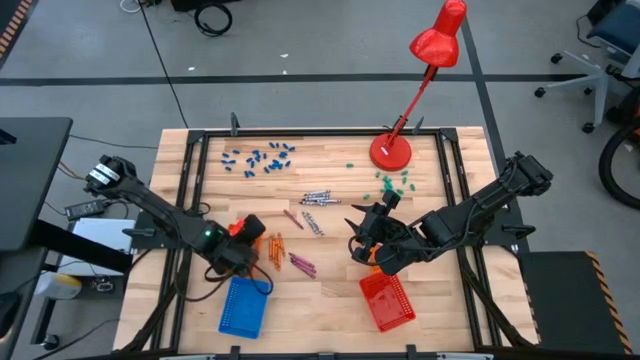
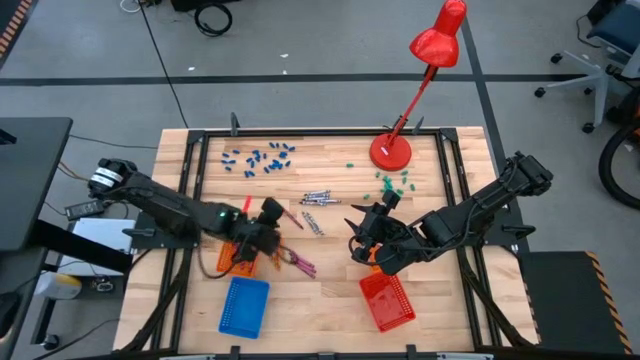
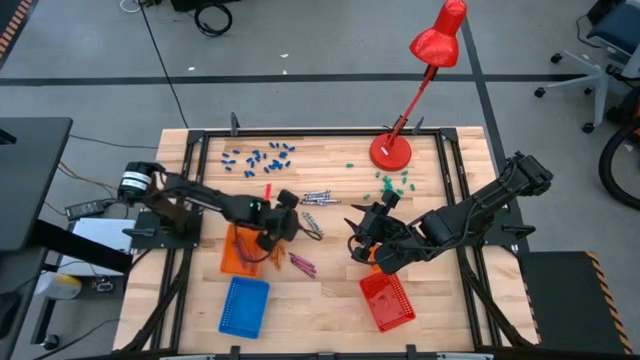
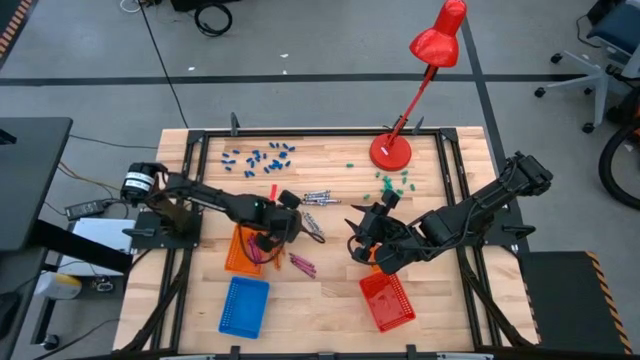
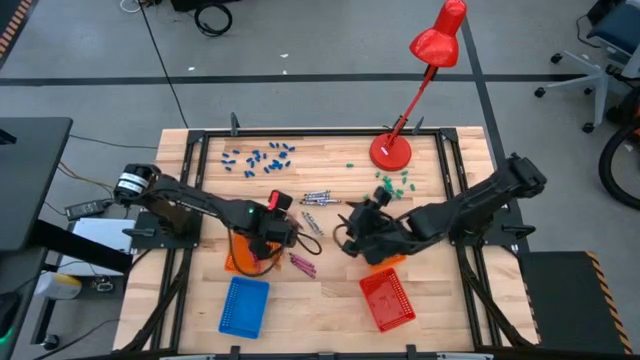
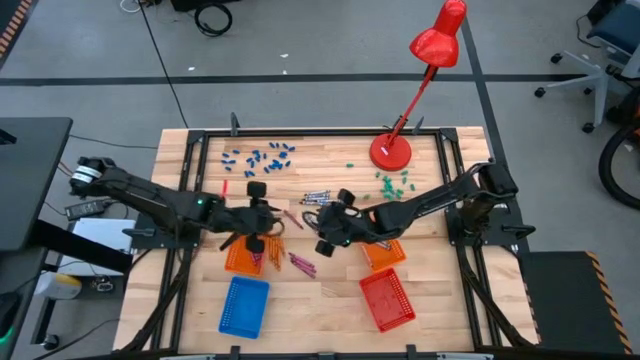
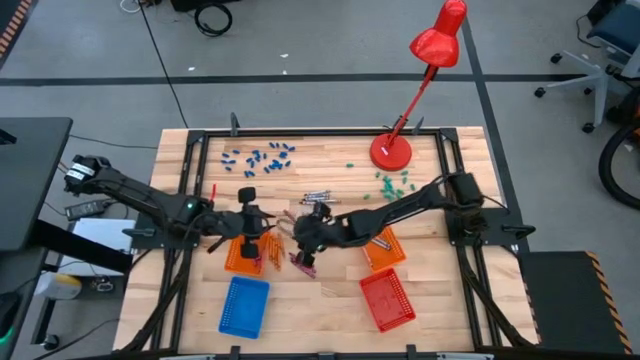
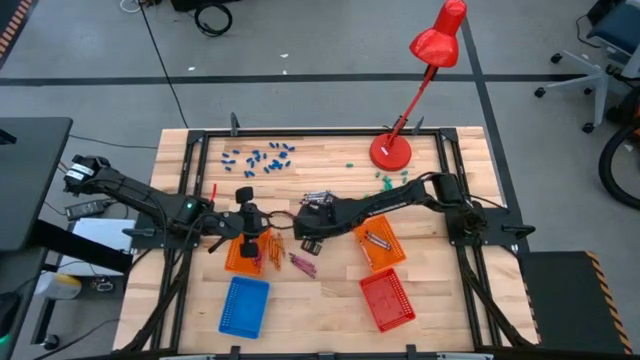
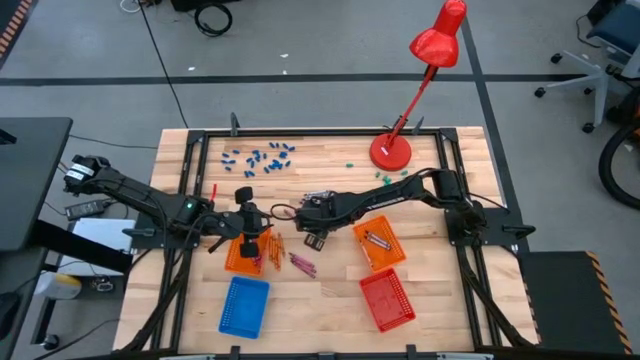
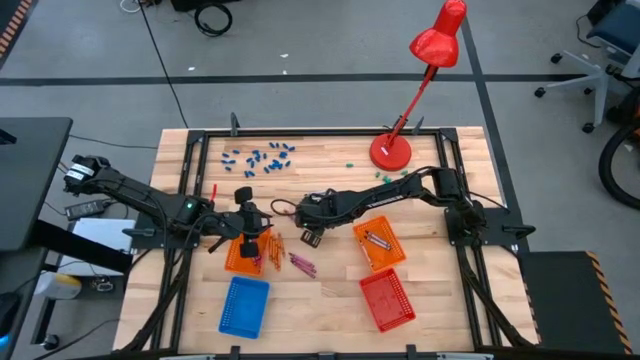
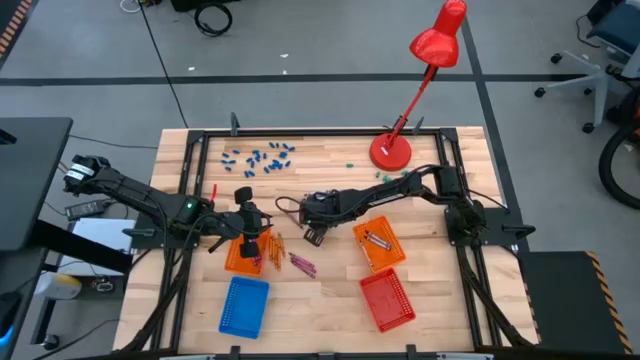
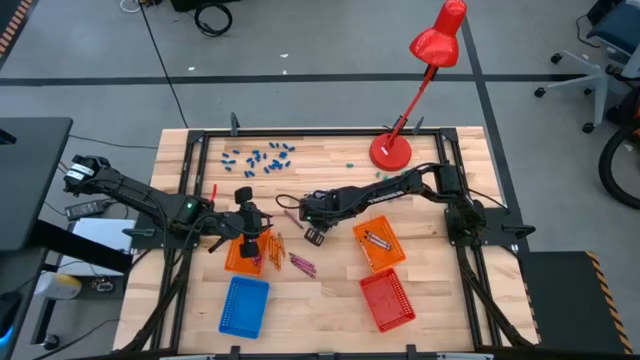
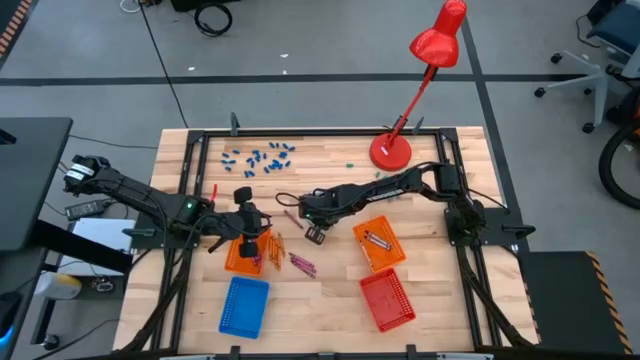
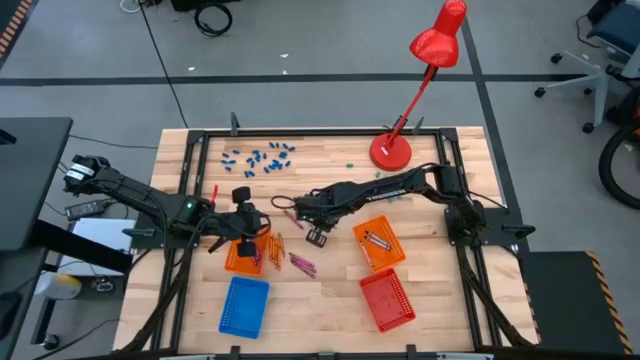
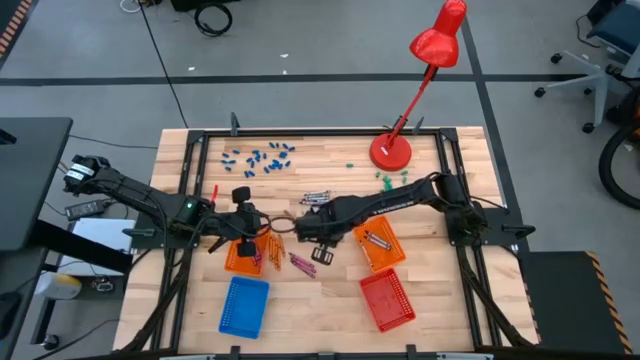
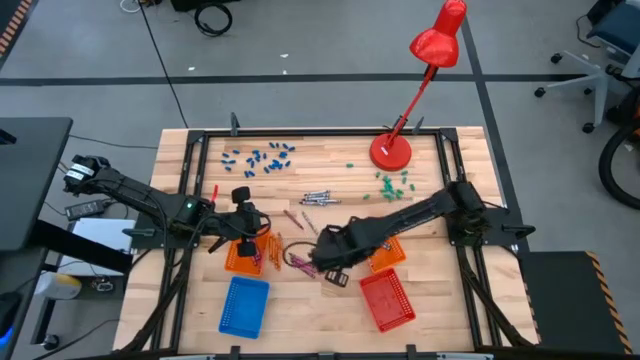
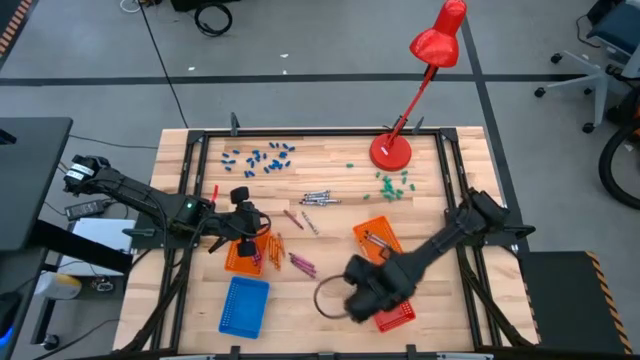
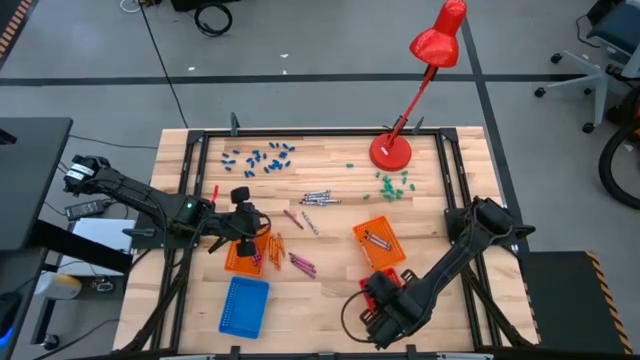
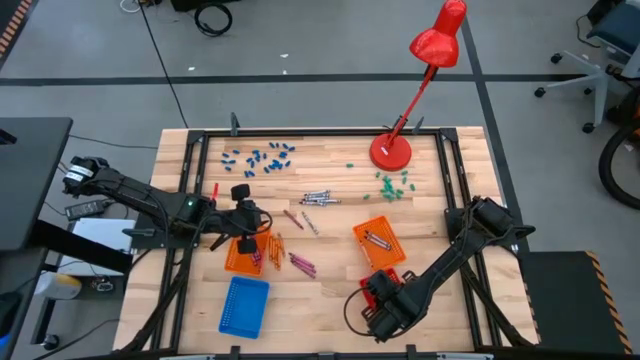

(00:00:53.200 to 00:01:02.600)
Task: Sort crayons
Put the gray crayon into the red bin

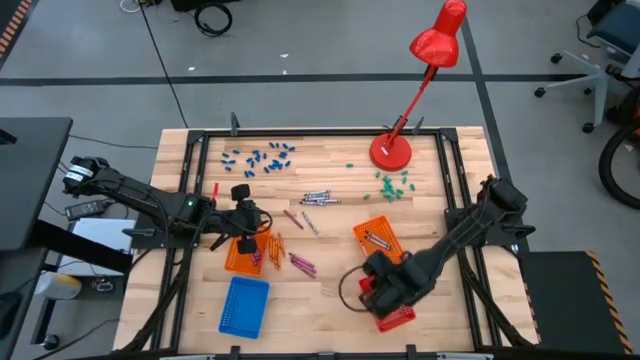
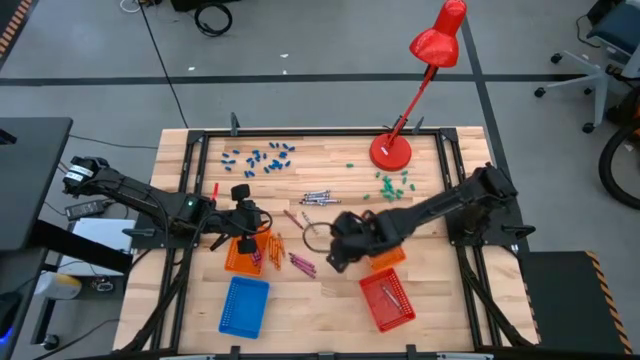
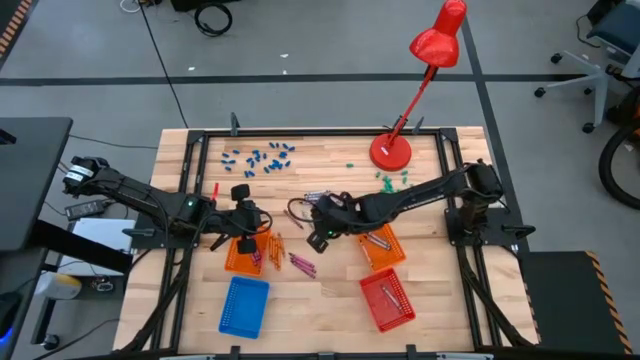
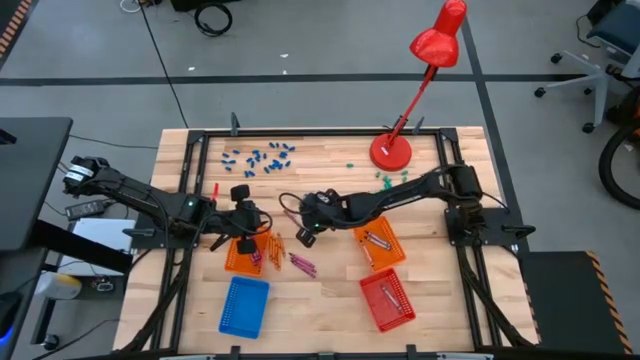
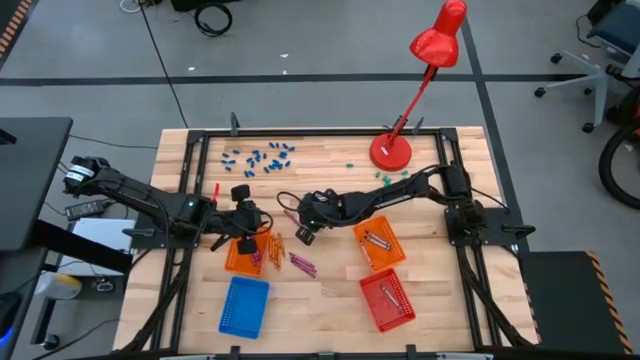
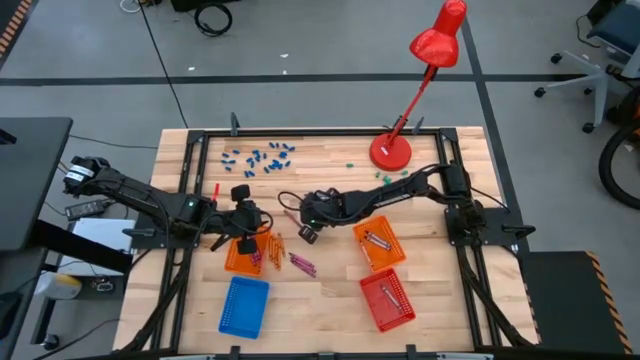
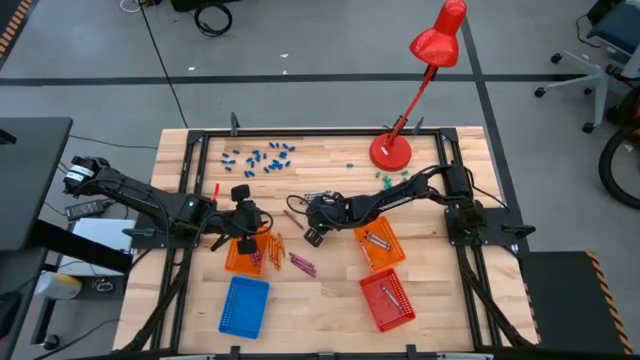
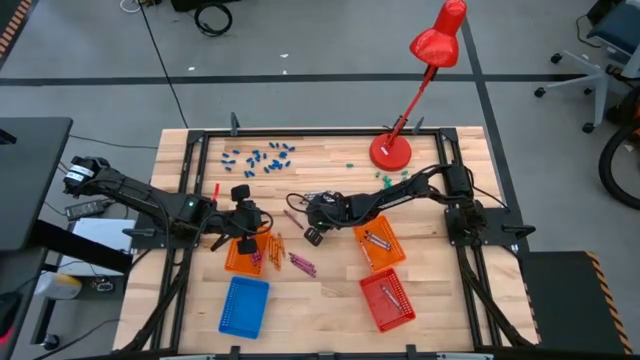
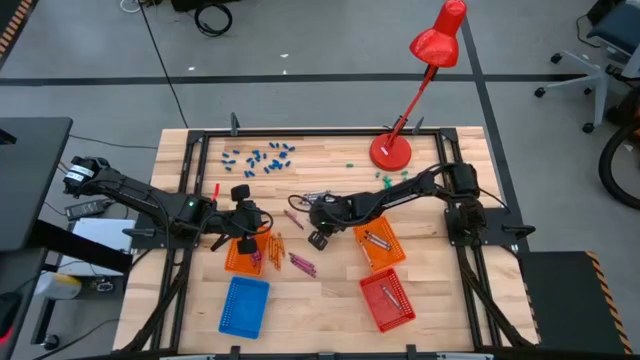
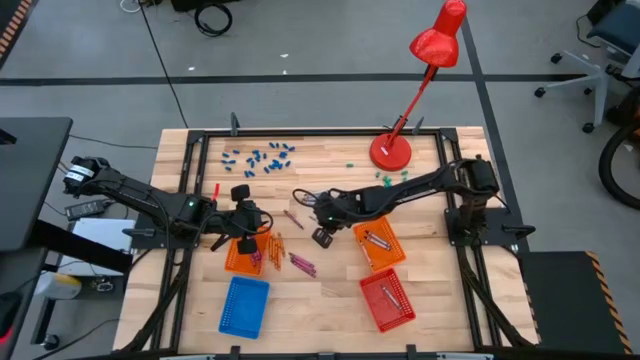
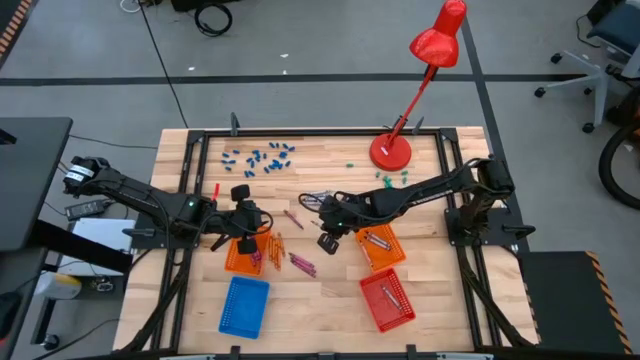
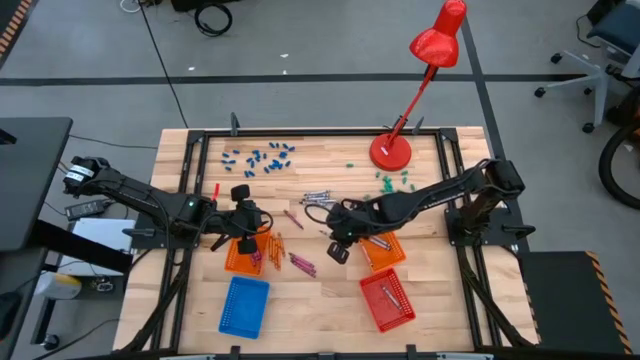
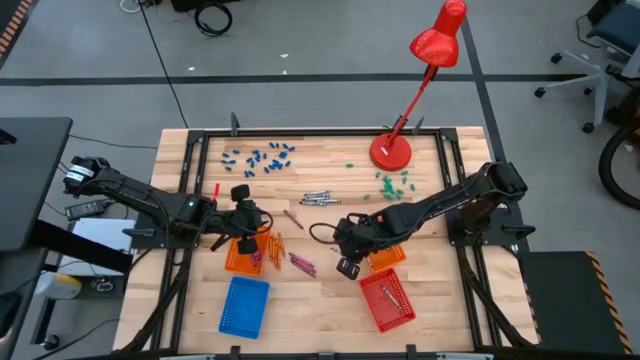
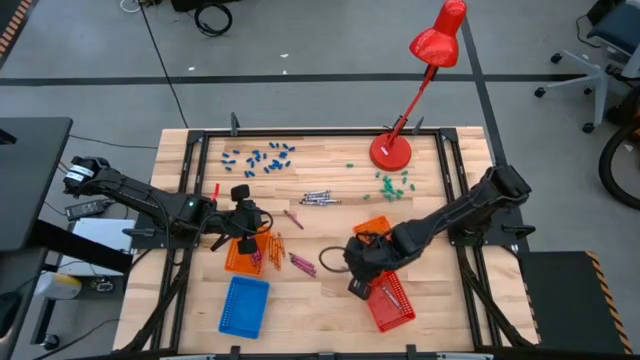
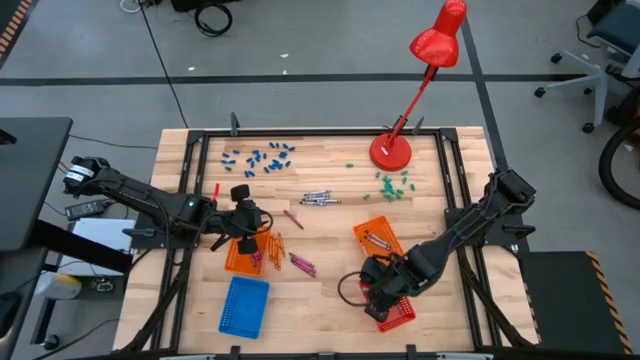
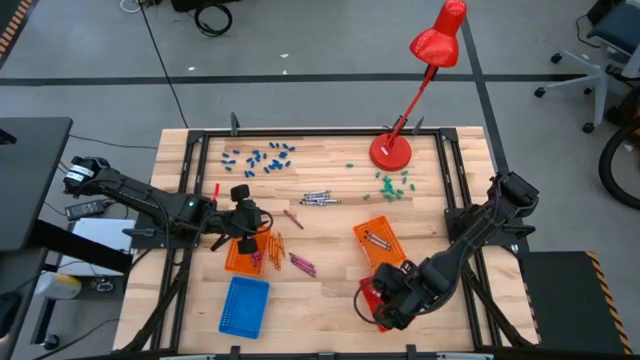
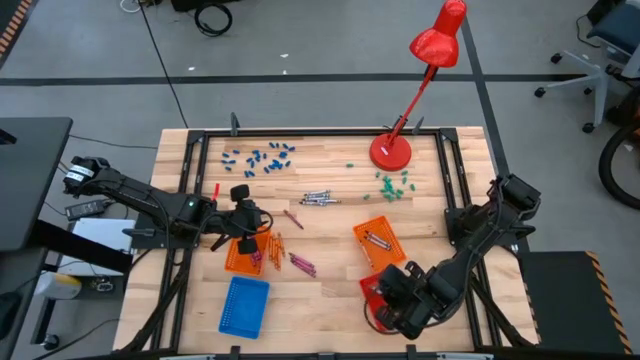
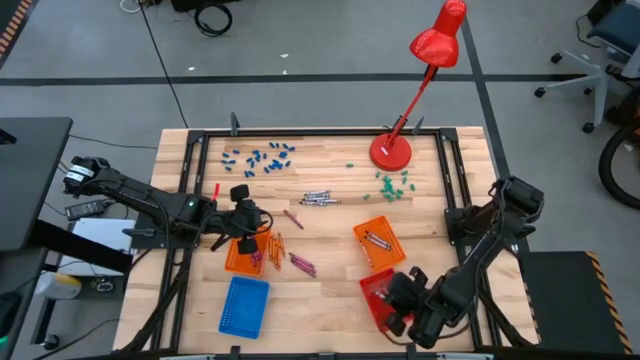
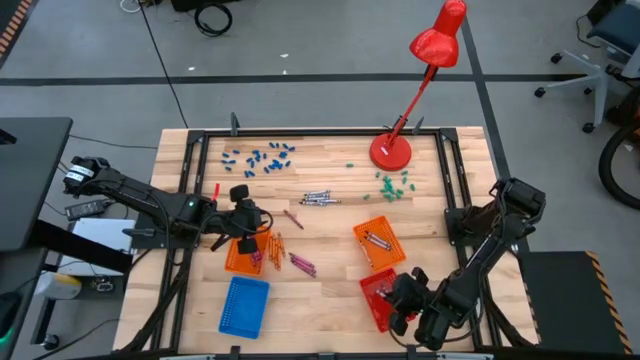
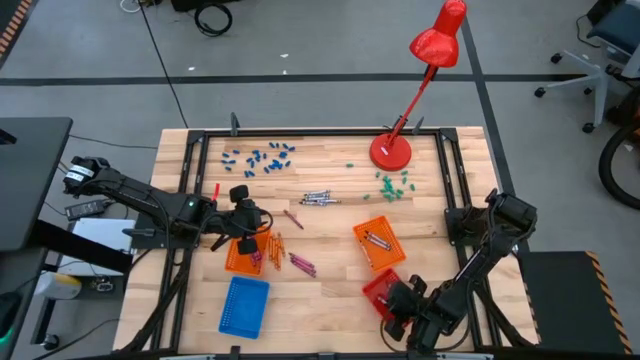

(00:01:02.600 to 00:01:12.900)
Put the gray crayon into the red bin
